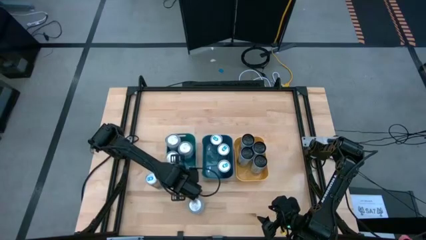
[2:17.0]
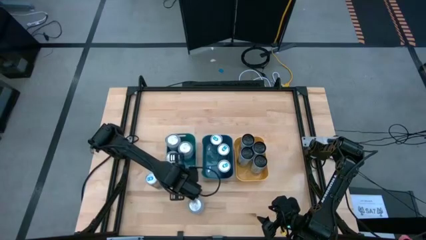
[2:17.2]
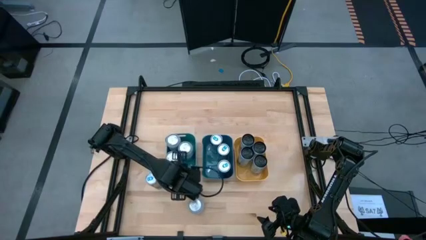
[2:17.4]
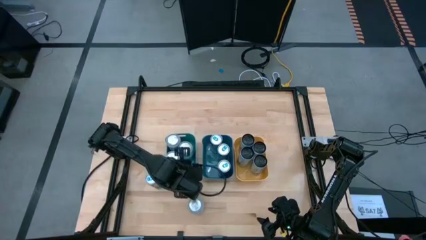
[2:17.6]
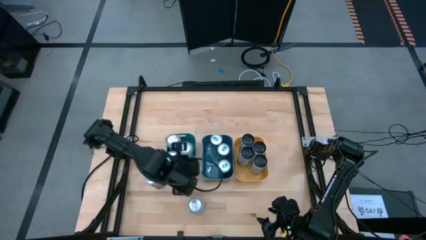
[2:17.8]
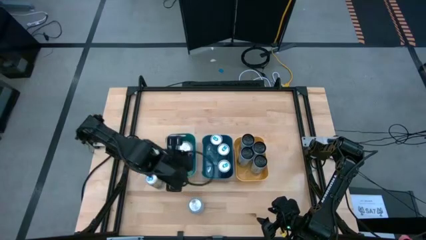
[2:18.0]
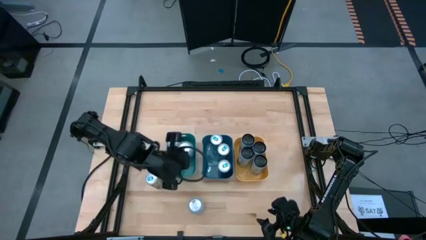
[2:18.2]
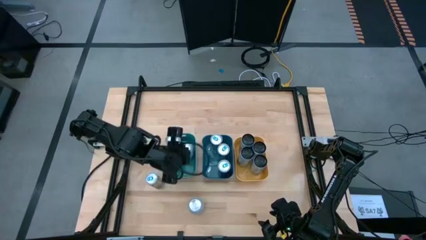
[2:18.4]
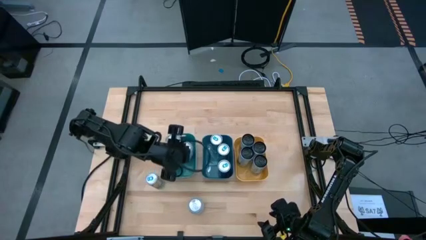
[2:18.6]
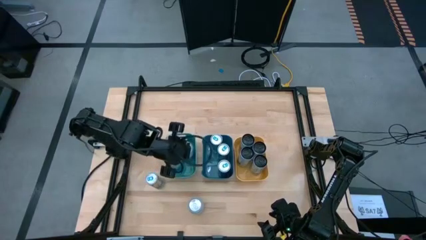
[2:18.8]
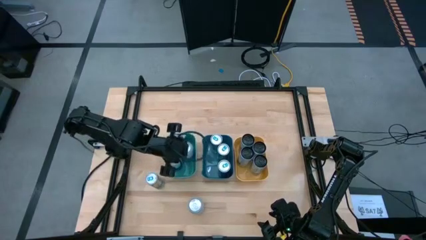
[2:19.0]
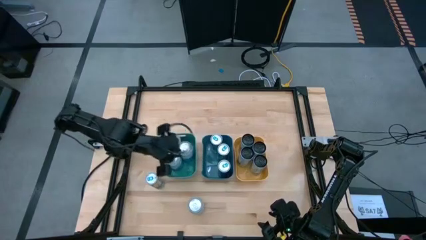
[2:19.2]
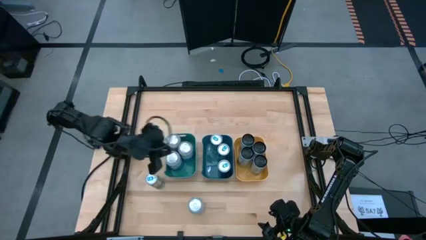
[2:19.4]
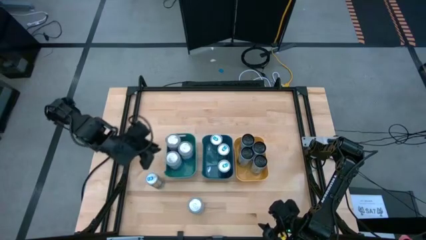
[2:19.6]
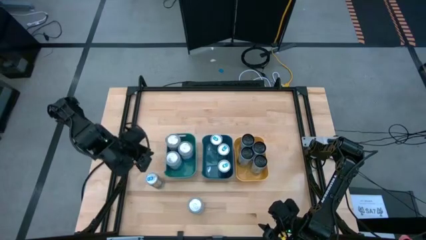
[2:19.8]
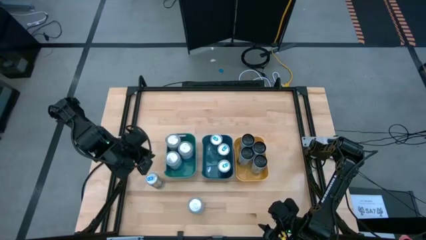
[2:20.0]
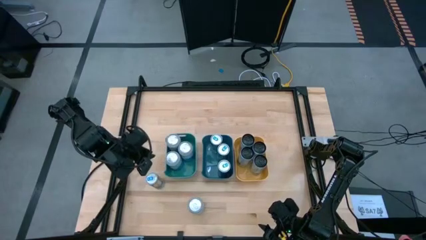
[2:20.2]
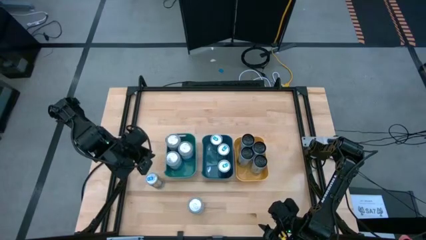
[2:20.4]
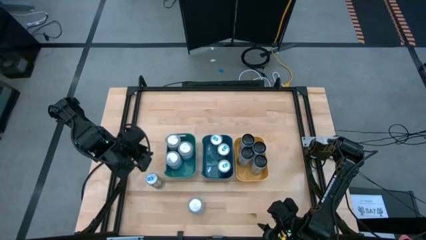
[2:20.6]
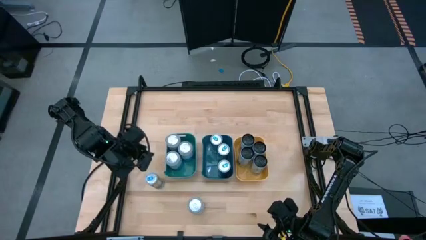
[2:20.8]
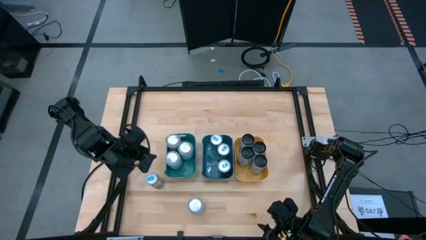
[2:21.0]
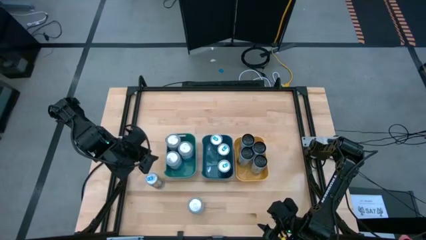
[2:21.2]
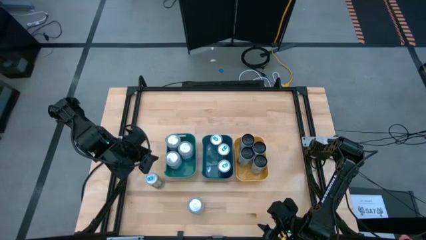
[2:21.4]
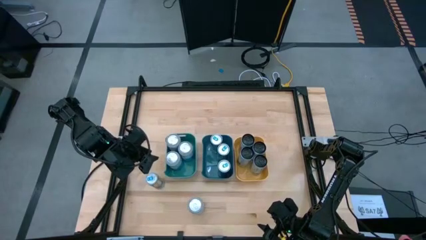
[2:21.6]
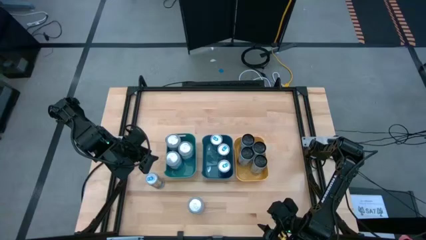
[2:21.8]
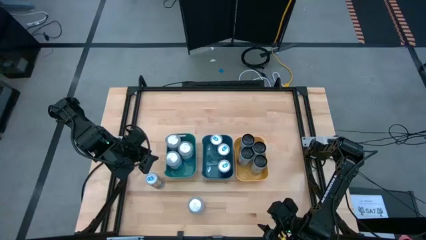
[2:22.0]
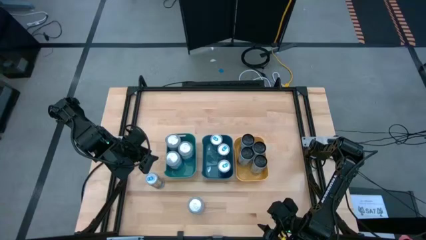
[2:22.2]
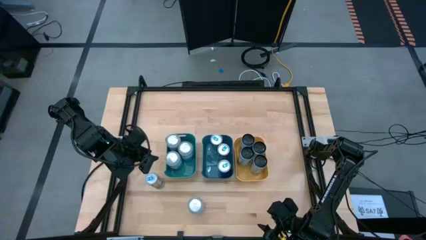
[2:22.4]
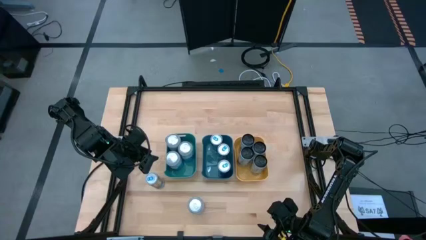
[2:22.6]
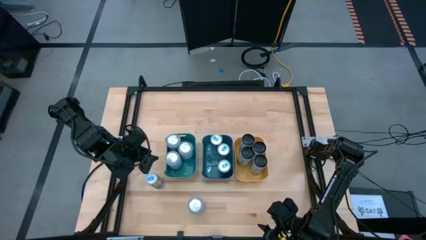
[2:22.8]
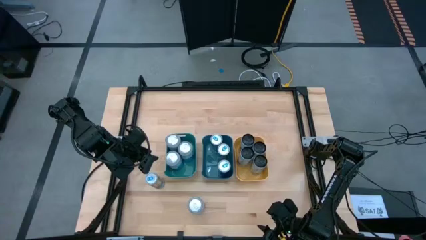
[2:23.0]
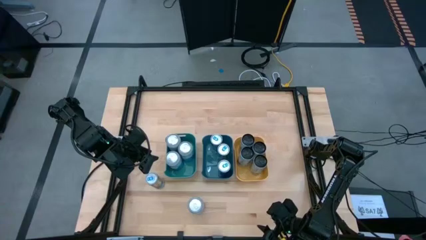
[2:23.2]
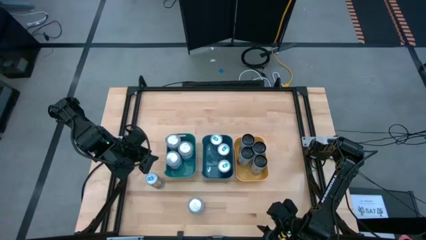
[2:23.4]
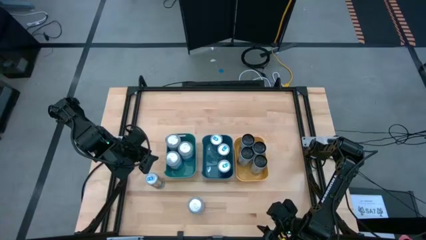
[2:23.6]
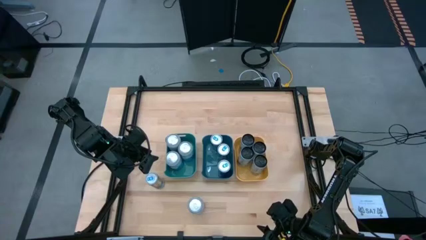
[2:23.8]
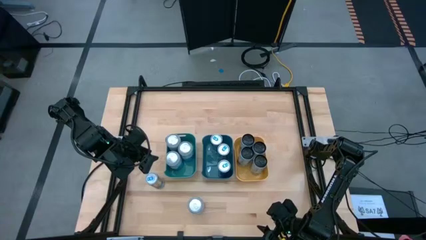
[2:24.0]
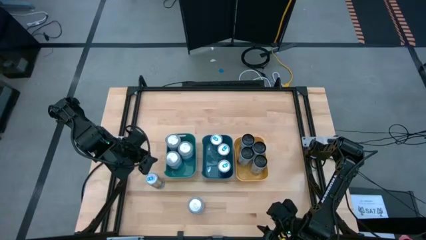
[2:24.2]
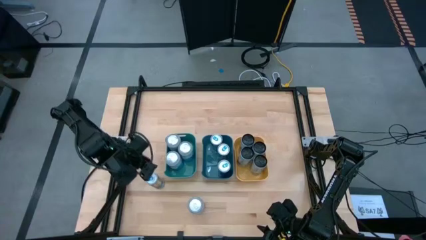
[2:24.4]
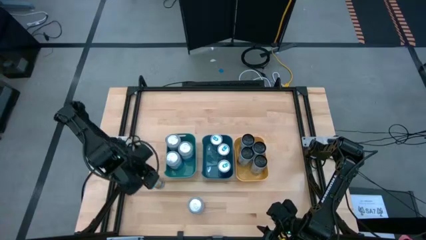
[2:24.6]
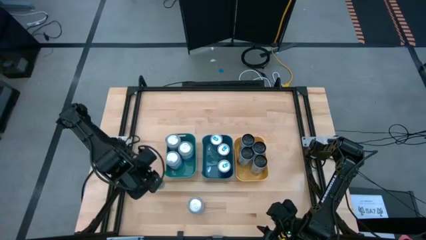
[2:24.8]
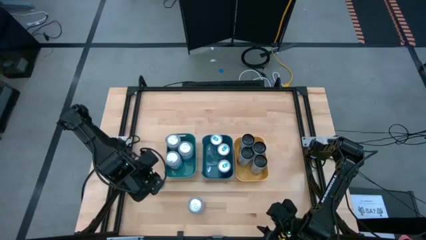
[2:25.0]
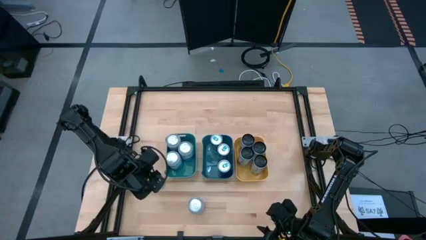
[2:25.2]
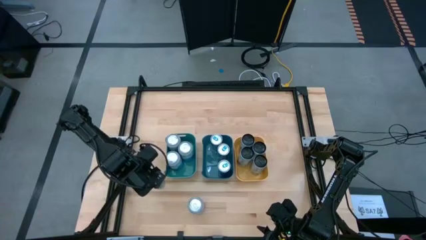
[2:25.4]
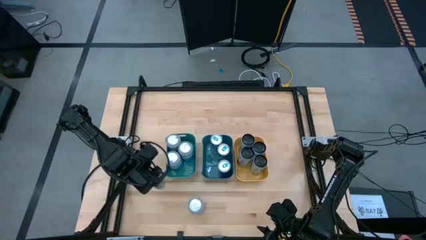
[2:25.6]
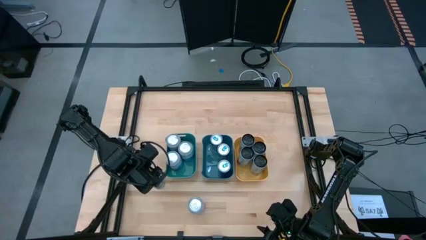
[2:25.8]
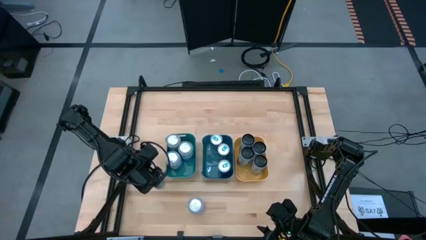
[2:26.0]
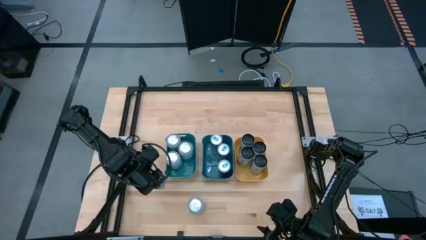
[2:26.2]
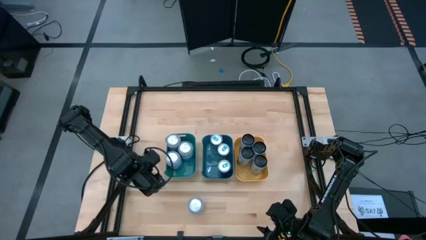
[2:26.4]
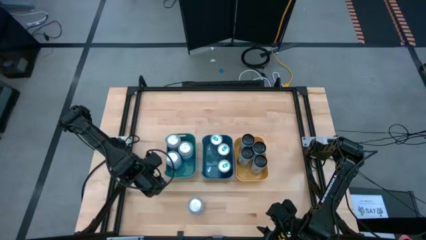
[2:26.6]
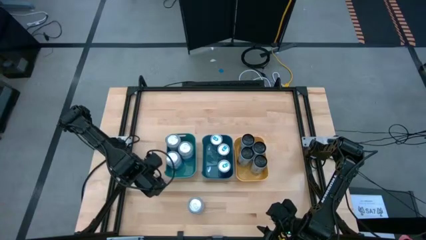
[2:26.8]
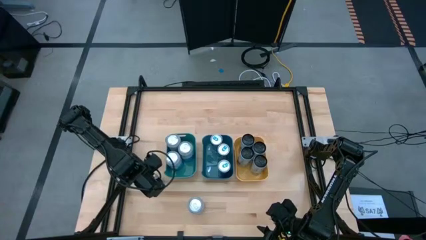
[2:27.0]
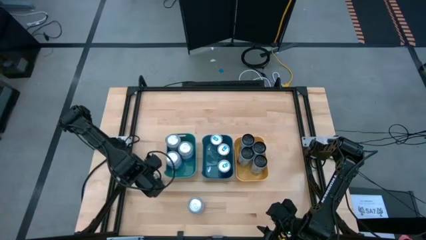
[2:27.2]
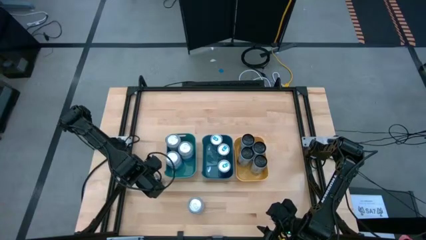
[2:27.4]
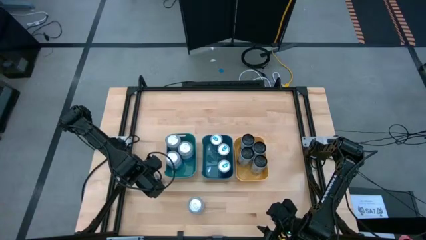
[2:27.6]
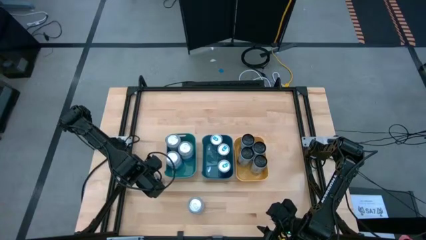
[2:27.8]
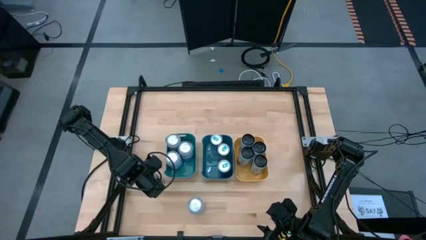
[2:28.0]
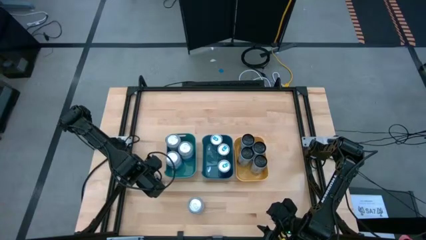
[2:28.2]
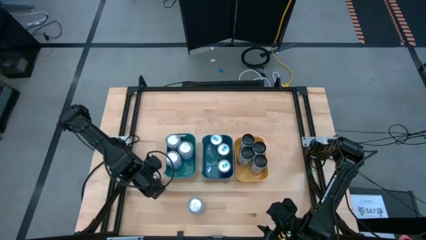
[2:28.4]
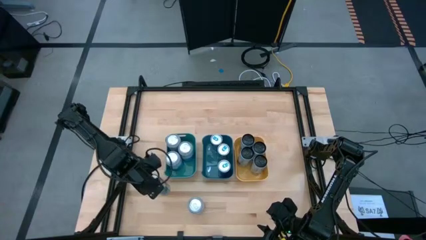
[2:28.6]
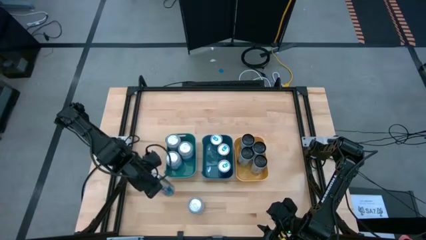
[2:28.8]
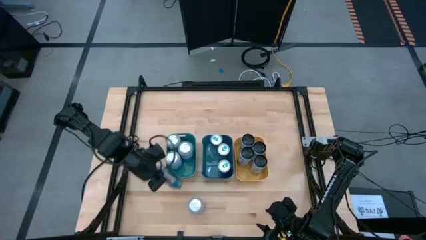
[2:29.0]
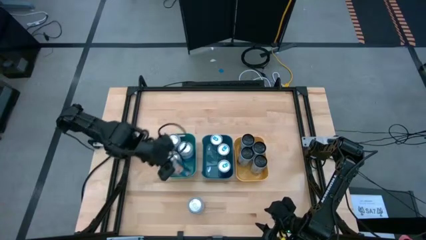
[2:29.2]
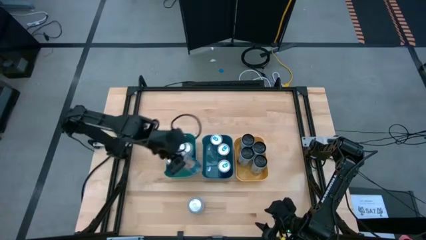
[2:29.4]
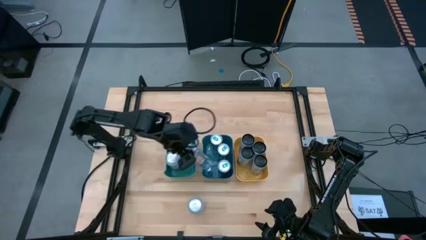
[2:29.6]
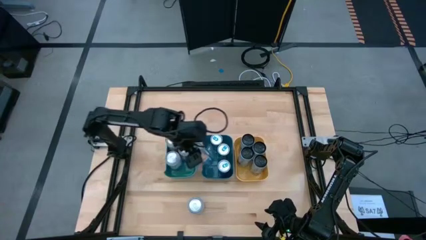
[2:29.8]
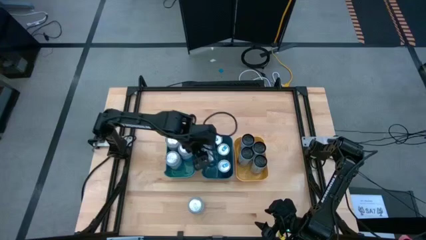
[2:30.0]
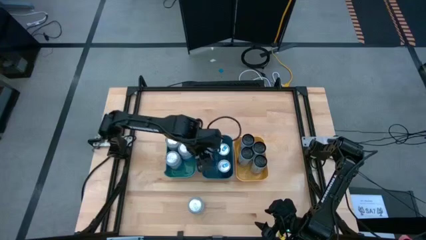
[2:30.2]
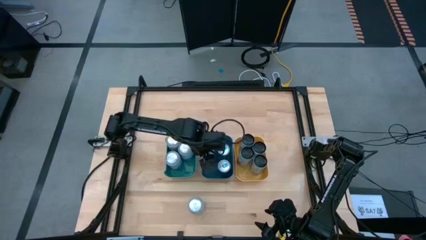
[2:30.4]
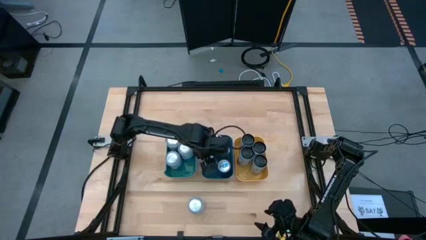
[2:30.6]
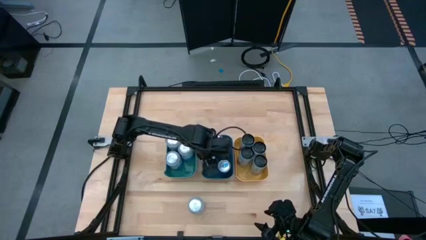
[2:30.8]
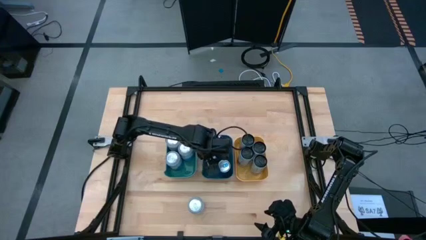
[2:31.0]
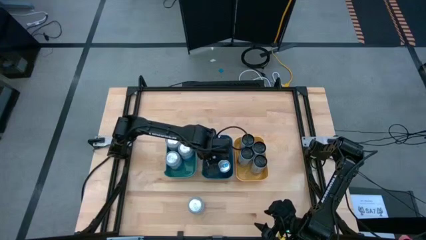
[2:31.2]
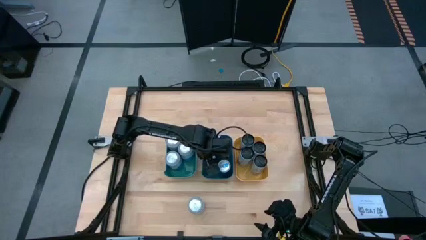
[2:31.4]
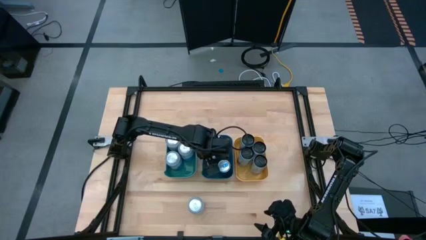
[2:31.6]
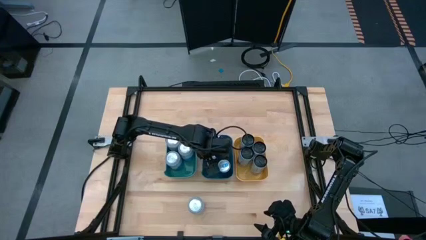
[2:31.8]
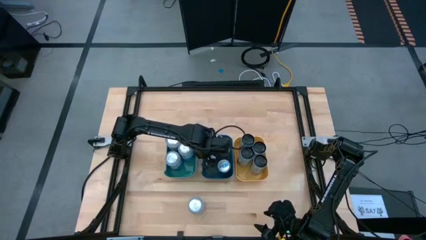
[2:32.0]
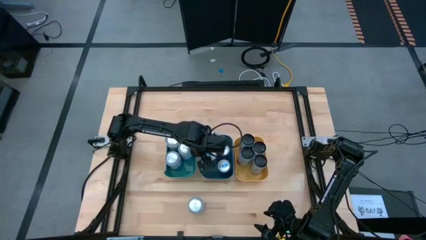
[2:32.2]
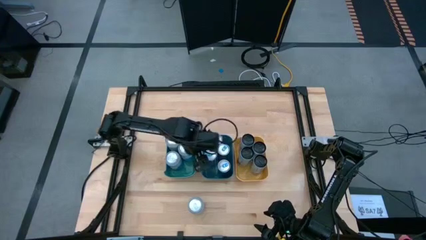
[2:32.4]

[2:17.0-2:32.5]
Task: Sort soda cans
Put the blue soda can into the blue bin

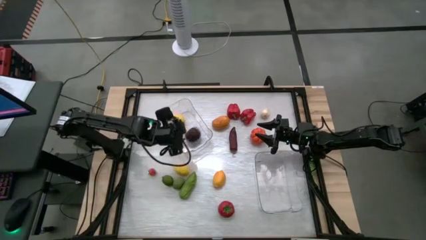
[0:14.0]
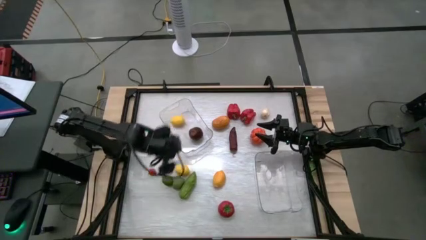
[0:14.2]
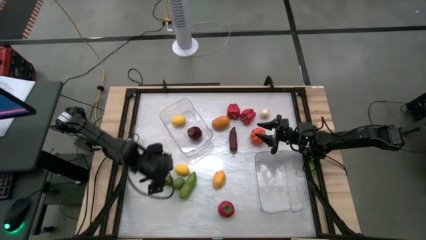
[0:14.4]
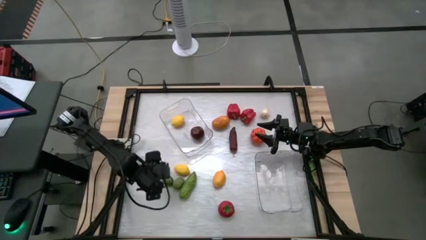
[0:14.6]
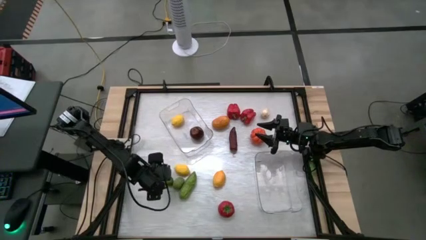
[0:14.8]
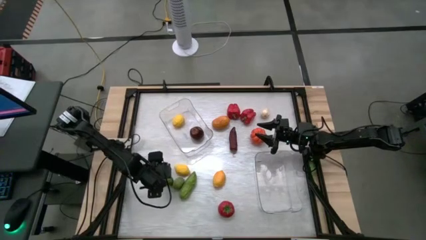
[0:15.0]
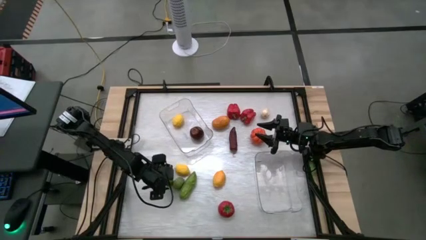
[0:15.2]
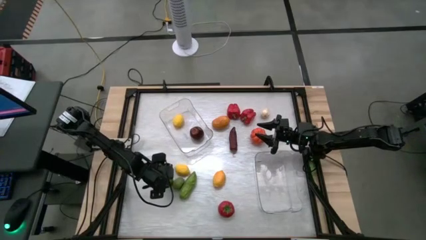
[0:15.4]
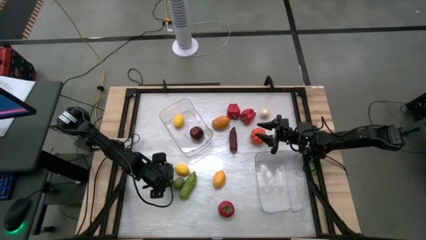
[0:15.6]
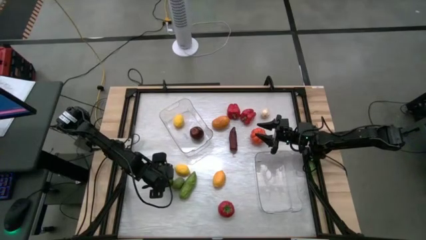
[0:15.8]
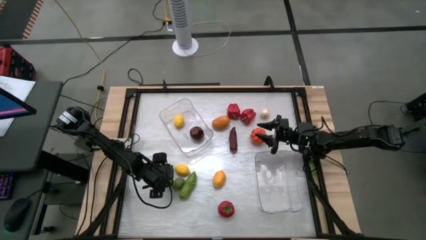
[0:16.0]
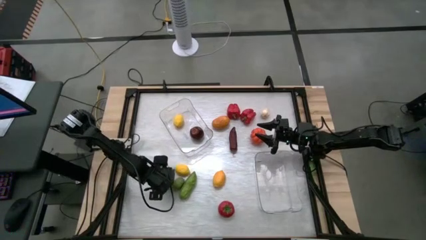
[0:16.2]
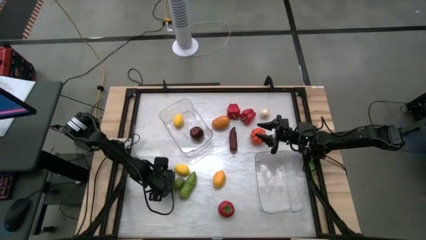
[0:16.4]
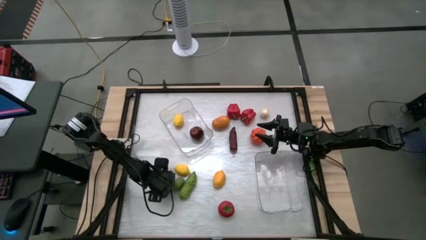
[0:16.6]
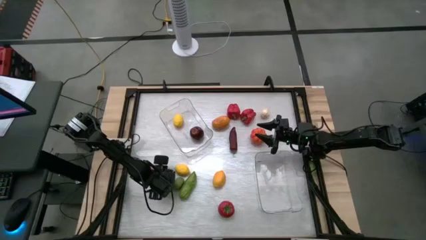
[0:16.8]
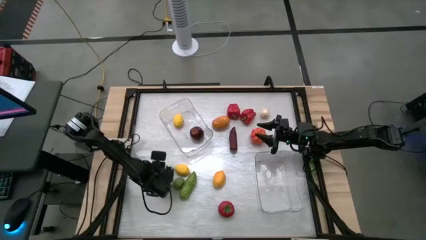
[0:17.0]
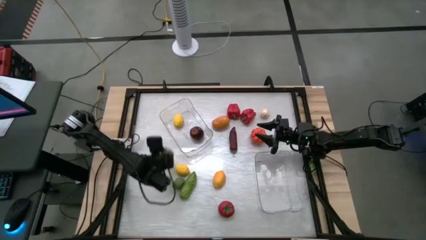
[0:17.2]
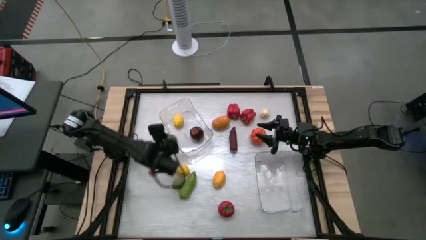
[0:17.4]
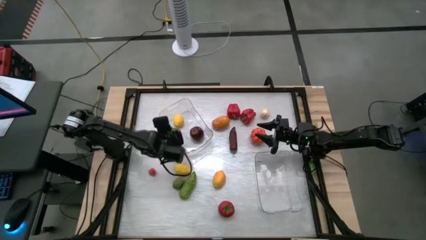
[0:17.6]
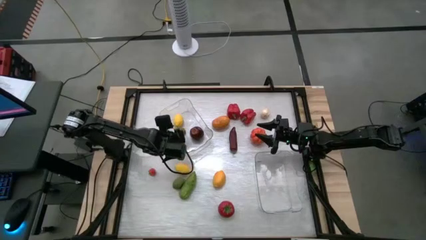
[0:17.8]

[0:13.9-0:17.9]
Task: Sort produce into baskets
Put the left green lime into the top transparent bin
